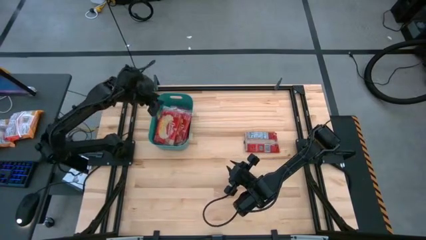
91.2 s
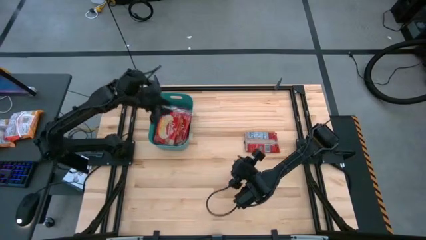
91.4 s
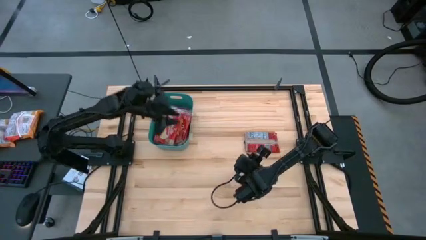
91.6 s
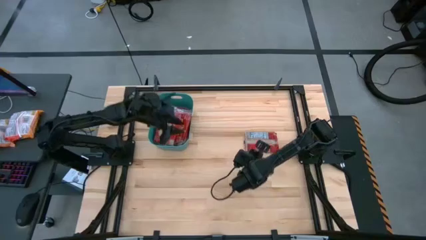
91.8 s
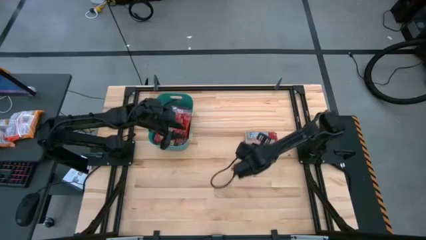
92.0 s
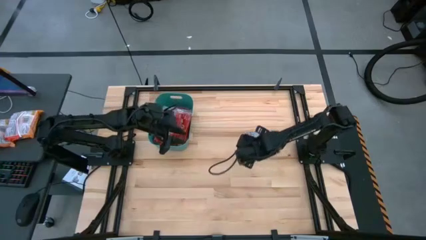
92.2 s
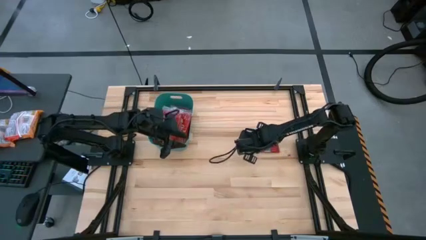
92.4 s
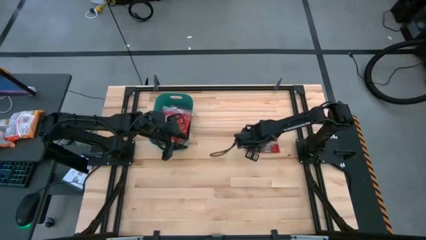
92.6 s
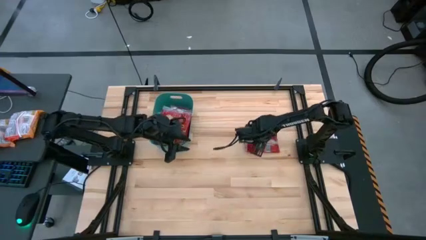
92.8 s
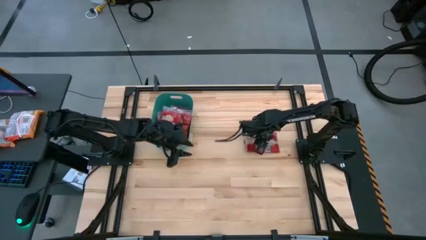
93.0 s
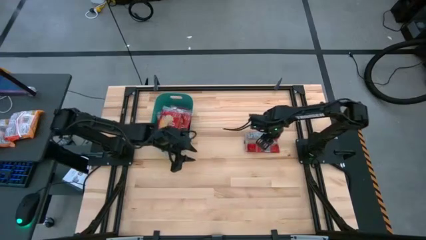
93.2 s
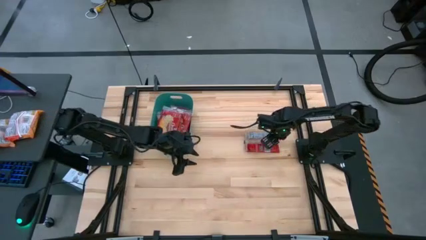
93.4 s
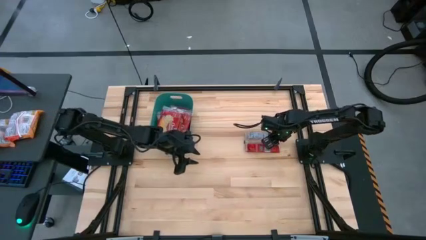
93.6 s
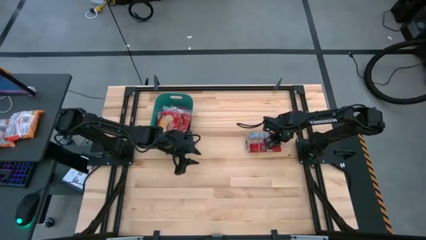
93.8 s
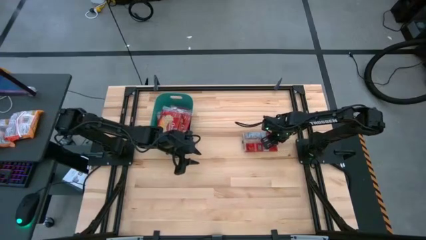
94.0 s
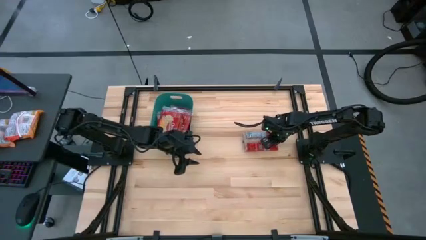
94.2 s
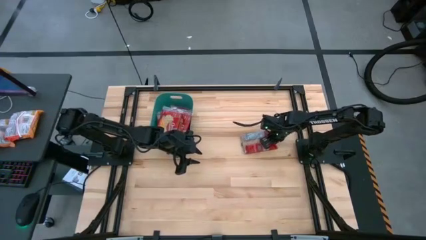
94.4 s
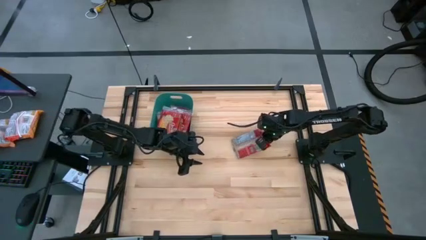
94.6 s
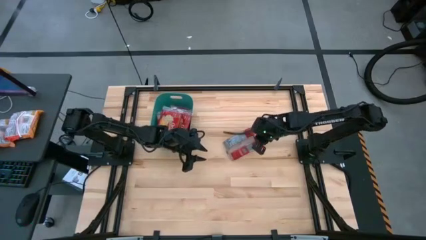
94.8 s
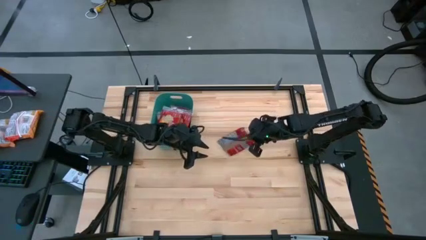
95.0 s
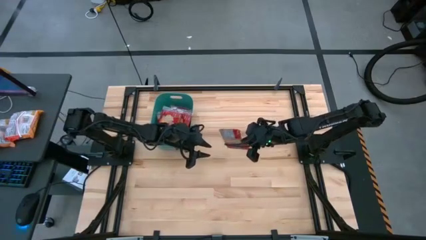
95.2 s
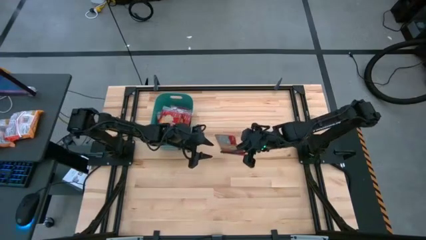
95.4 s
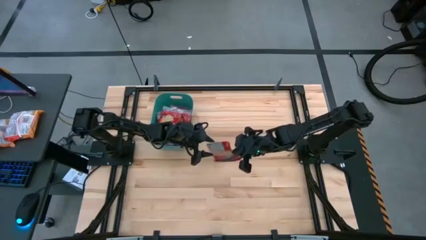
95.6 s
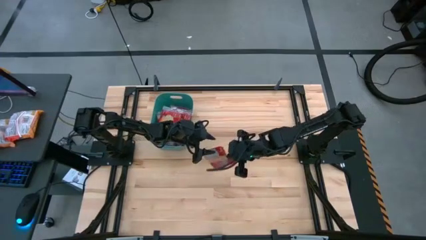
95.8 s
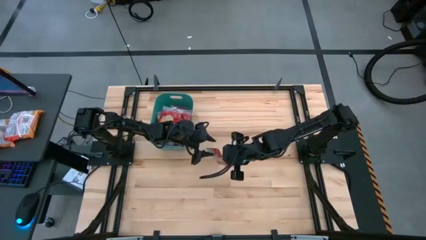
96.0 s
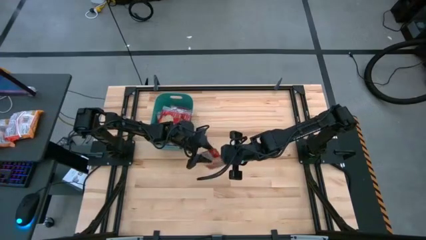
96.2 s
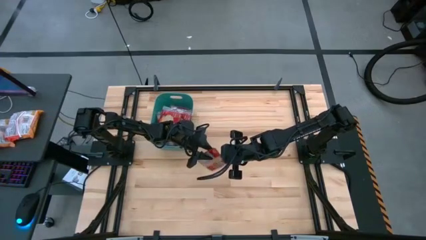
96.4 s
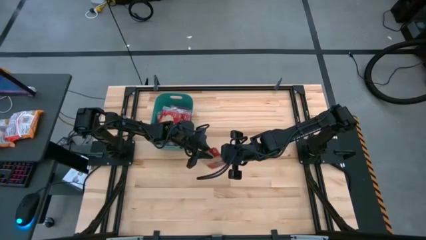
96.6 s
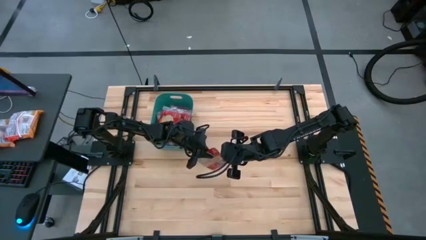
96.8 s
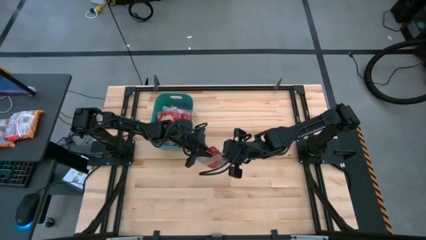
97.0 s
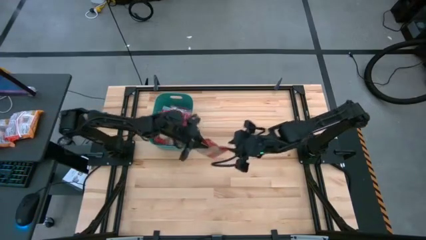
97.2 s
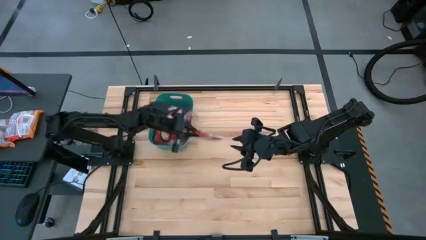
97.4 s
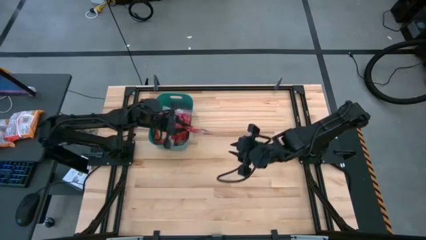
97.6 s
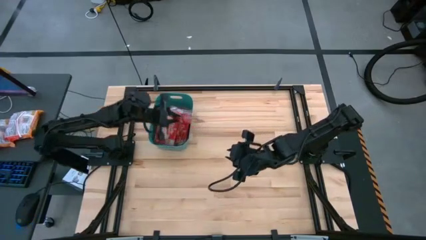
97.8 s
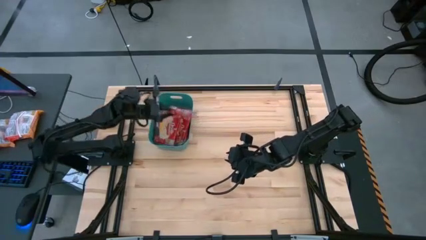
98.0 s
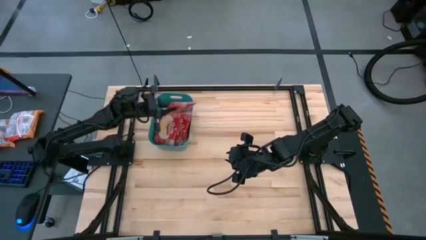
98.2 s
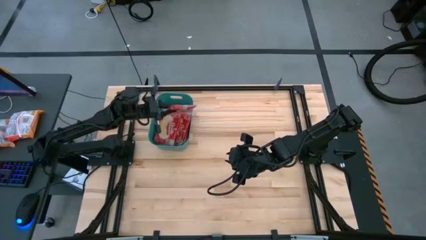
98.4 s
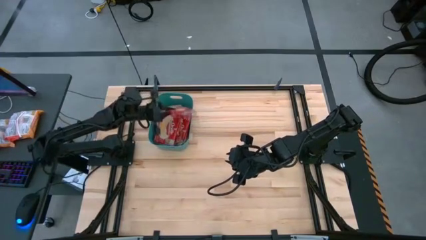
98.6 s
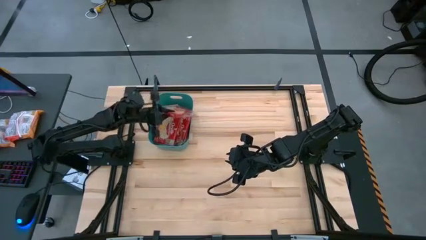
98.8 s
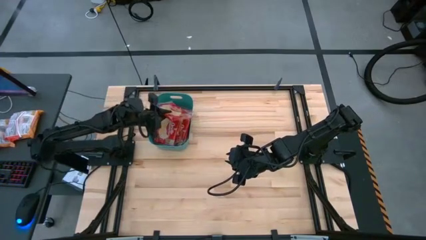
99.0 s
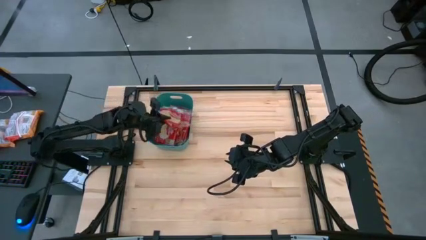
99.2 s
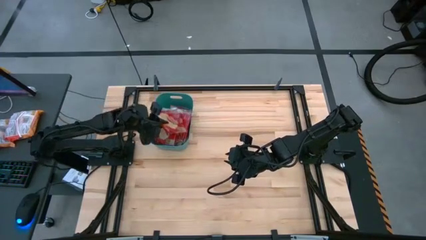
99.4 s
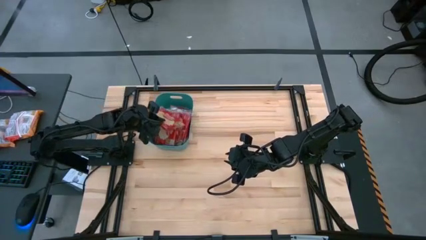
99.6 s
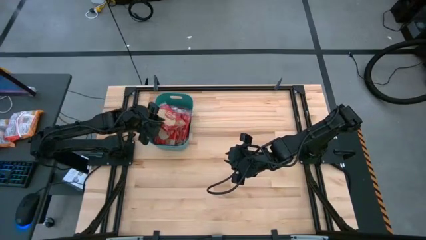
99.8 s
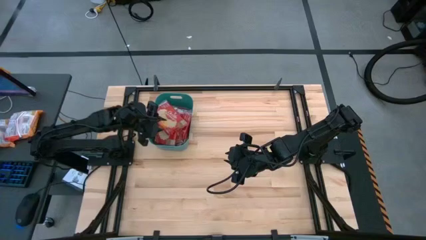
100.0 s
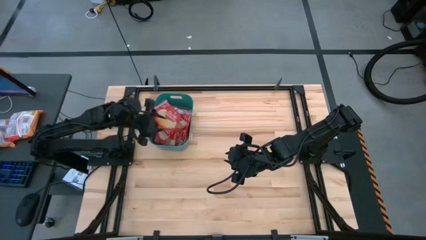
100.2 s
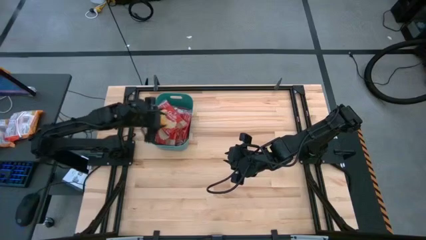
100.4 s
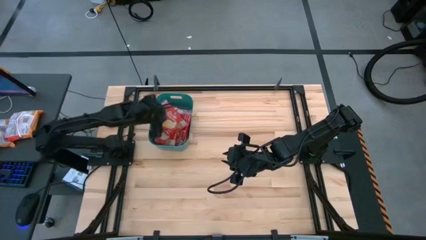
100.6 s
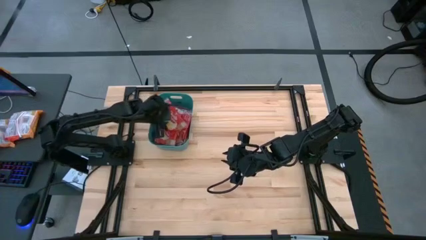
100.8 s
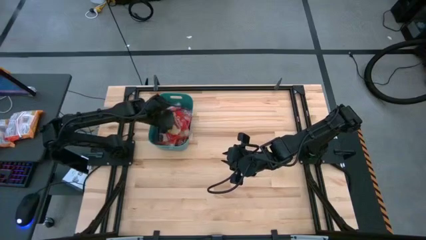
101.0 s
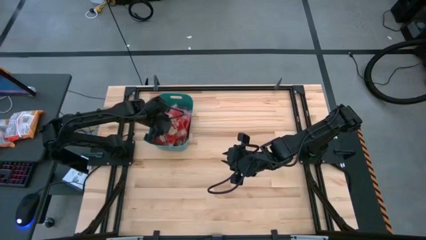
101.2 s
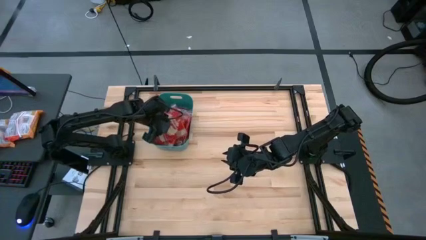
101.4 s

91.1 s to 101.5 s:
Task: Sort popcorn bags into baskets
Put the red popcorn bag into the green bin

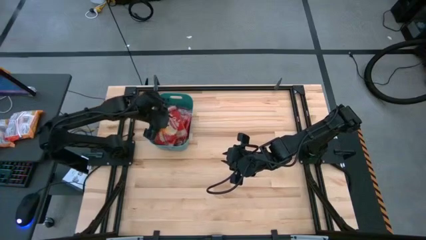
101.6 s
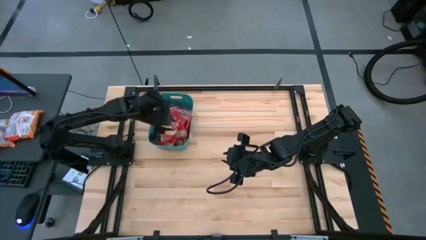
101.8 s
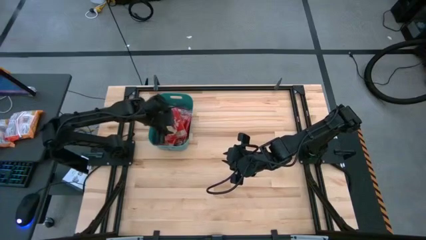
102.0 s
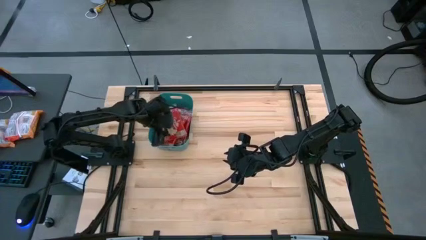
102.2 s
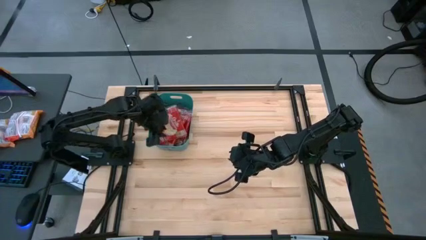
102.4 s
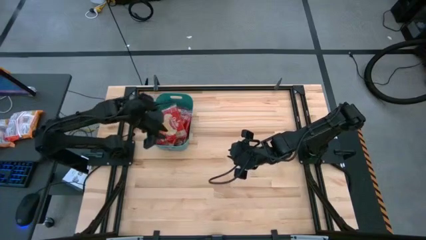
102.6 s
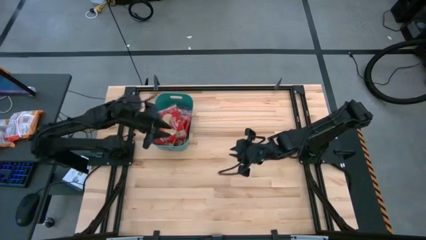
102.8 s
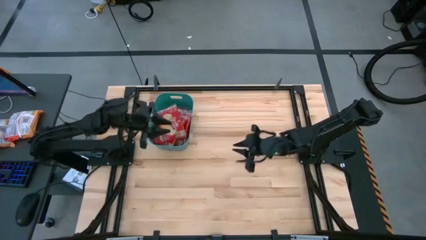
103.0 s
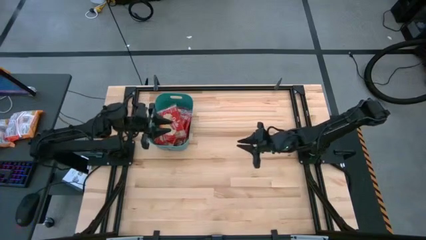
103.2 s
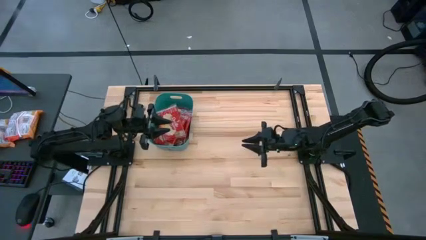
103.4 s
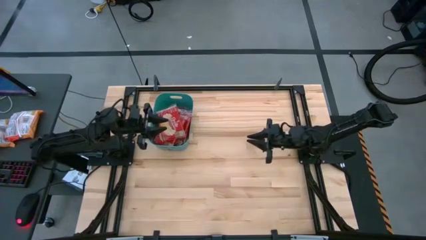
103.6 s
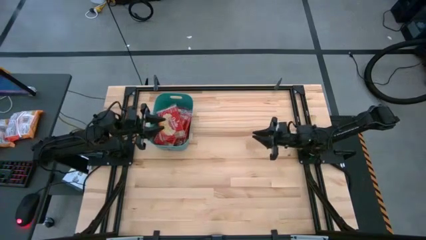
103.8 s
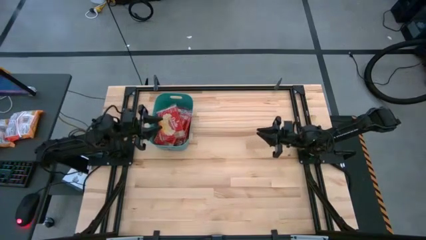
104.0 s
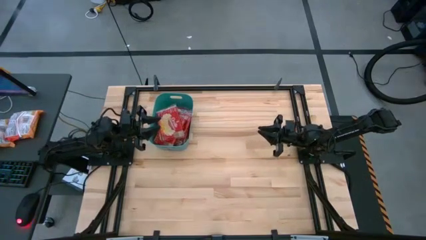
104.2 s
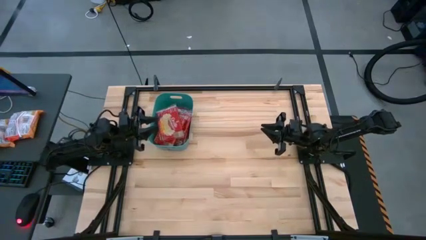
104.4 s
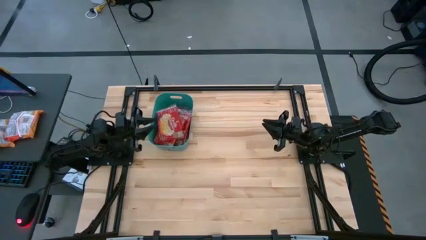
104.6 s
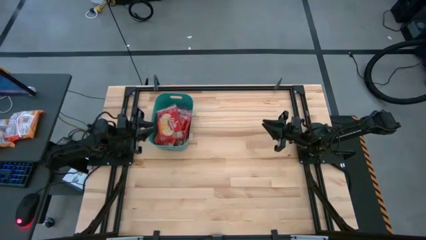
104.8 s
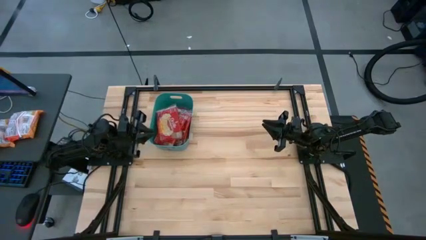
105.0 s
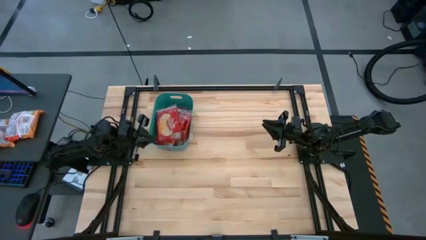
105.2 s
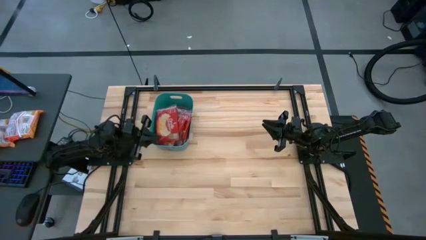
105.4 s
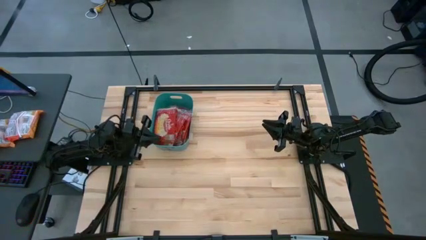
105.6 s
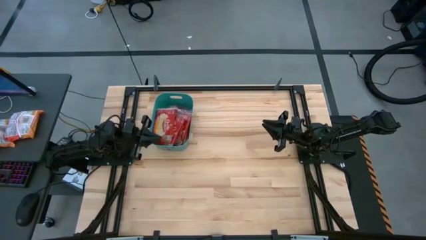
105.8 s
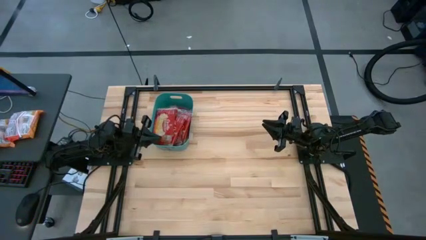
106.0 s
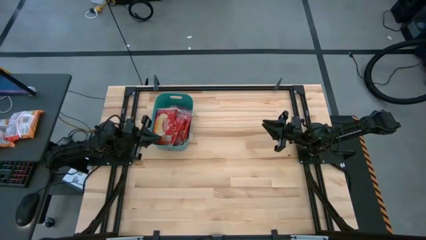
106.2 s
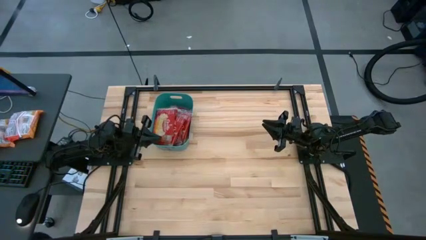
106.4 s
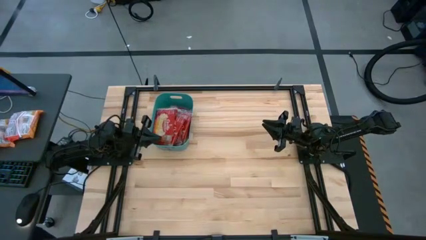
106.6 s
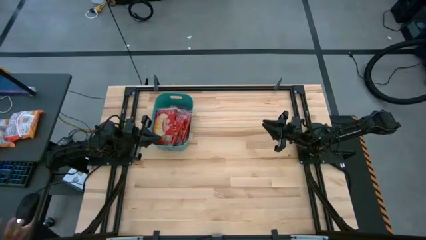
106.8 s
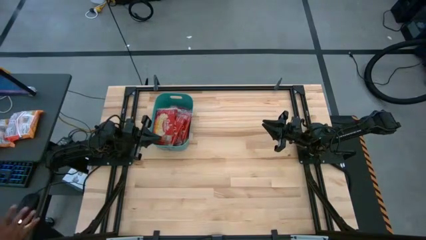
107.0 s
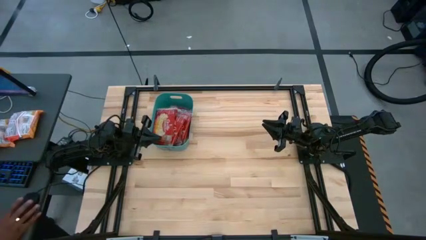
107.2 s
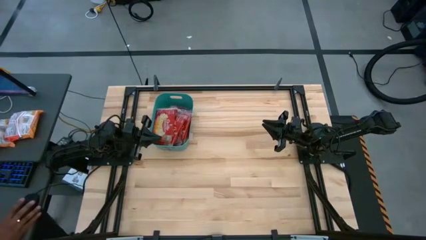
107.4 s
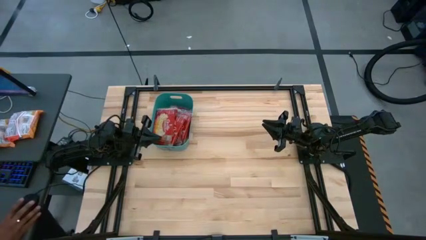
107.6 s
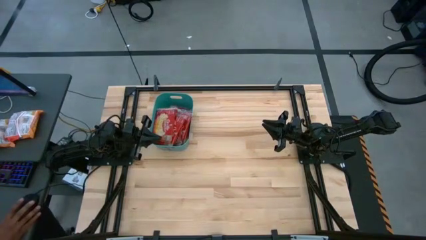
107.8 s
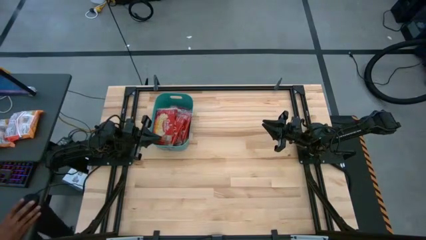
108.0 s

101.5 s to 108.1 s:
Return to Home Position
